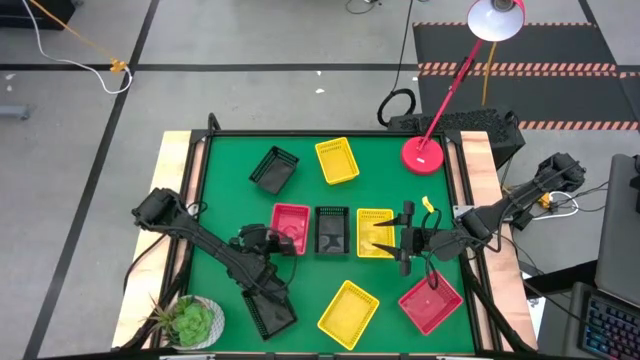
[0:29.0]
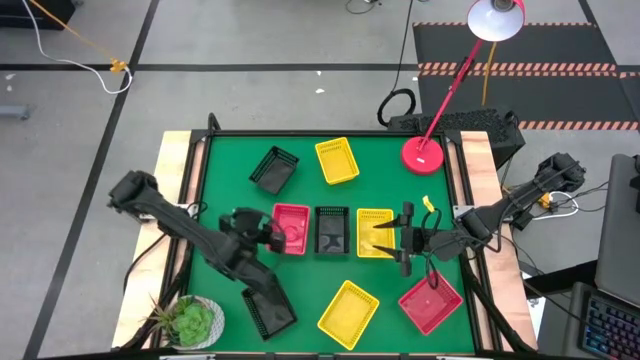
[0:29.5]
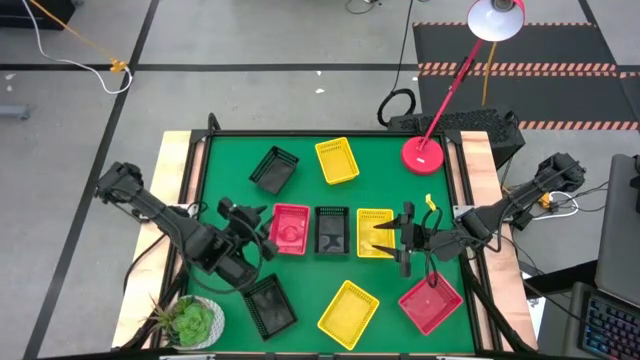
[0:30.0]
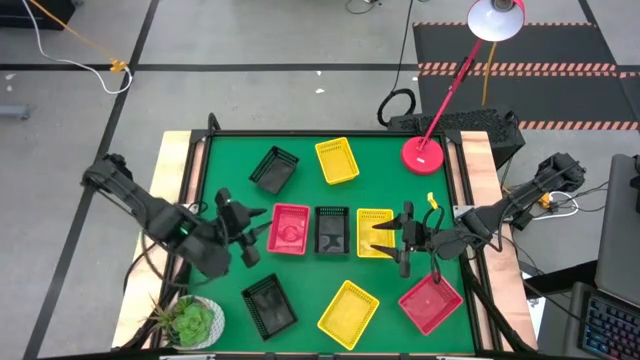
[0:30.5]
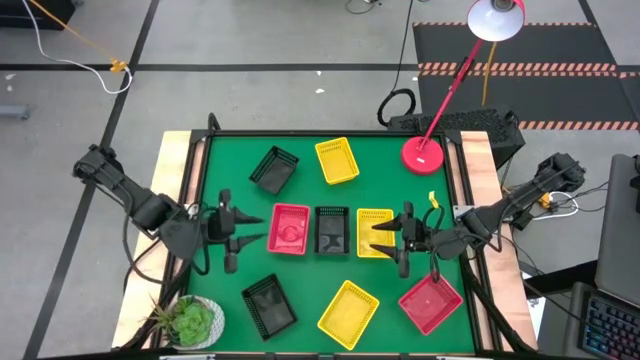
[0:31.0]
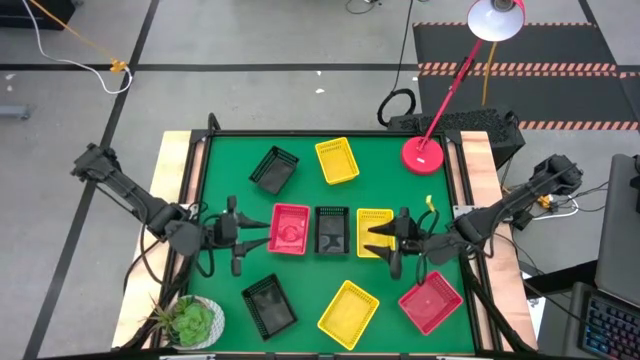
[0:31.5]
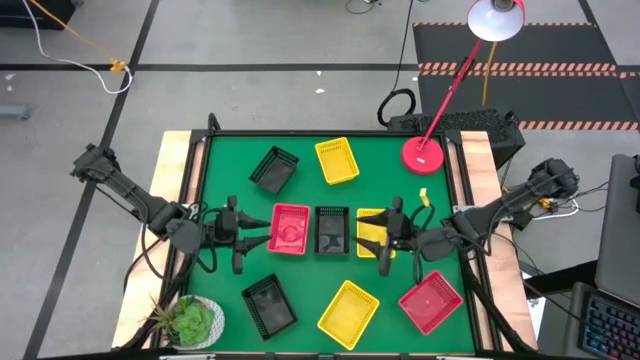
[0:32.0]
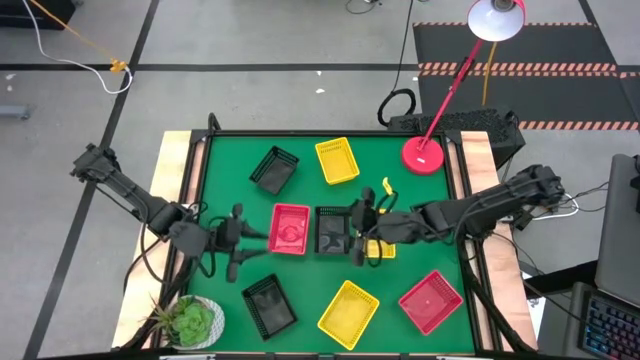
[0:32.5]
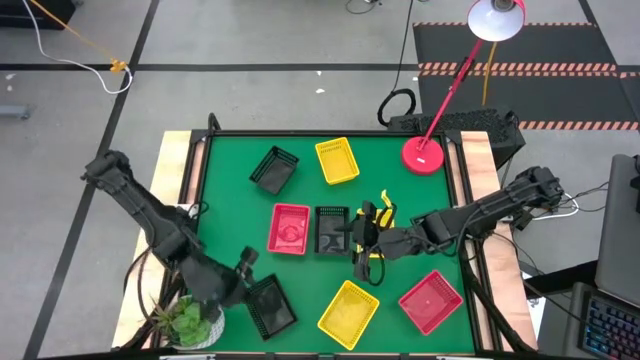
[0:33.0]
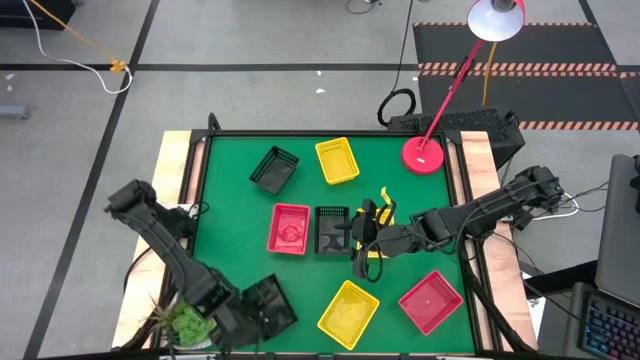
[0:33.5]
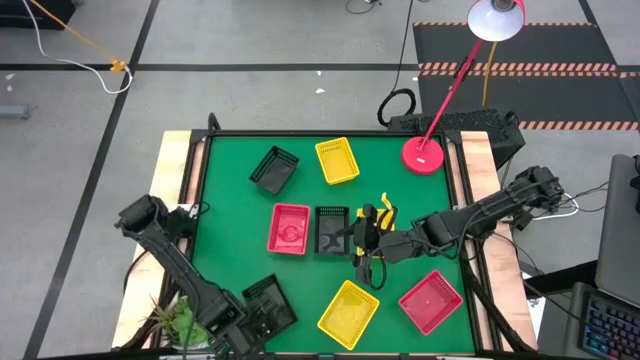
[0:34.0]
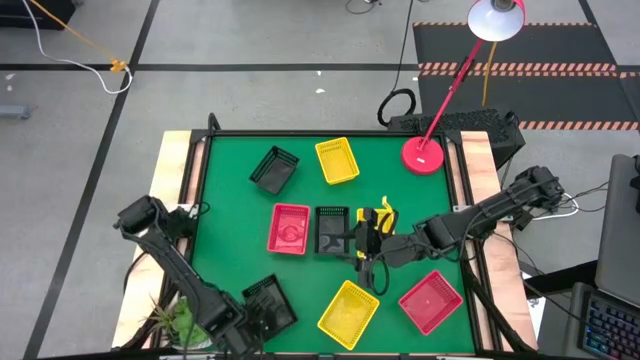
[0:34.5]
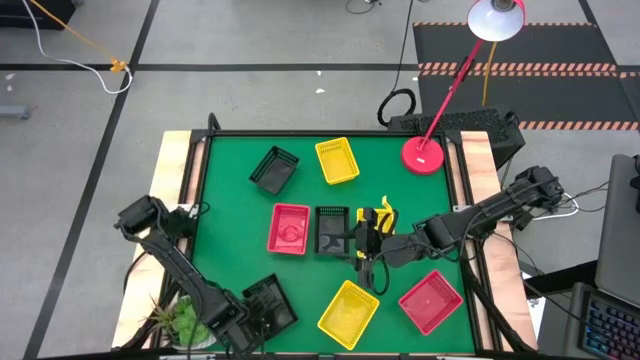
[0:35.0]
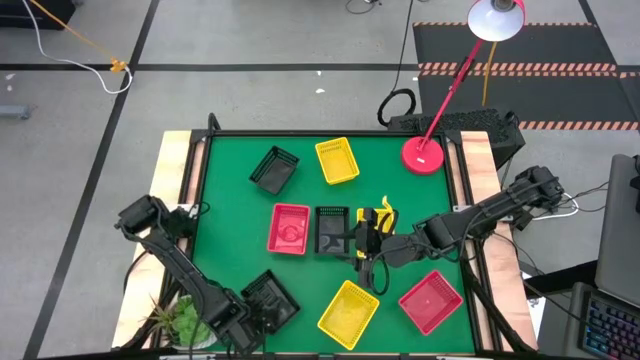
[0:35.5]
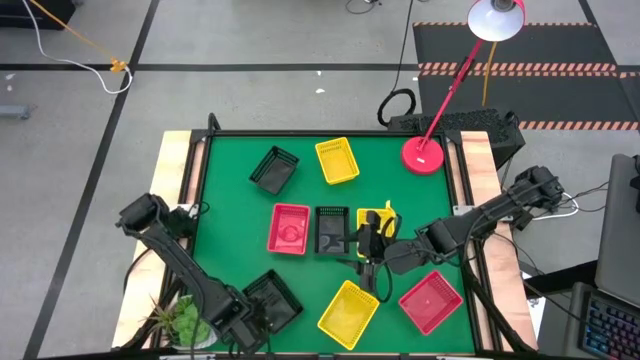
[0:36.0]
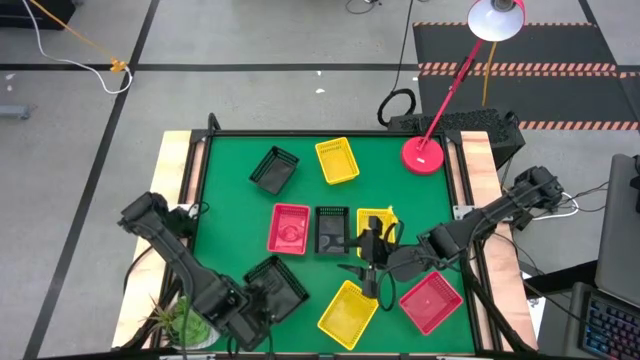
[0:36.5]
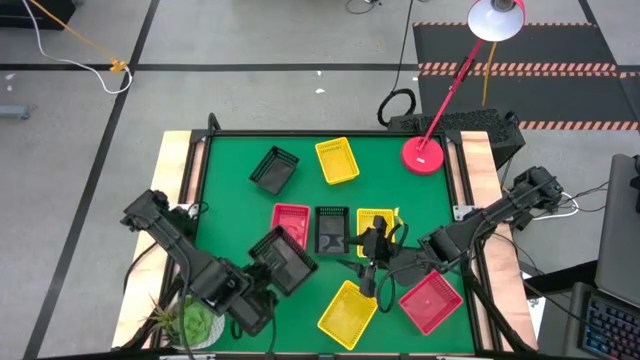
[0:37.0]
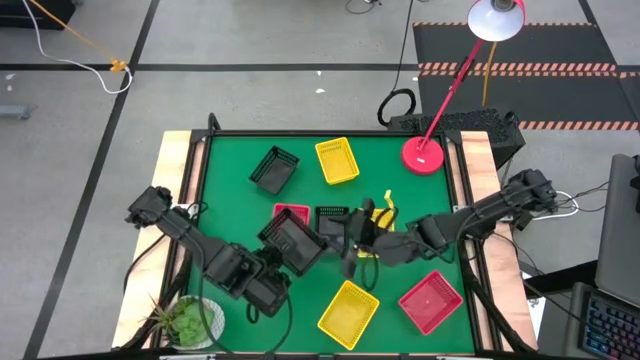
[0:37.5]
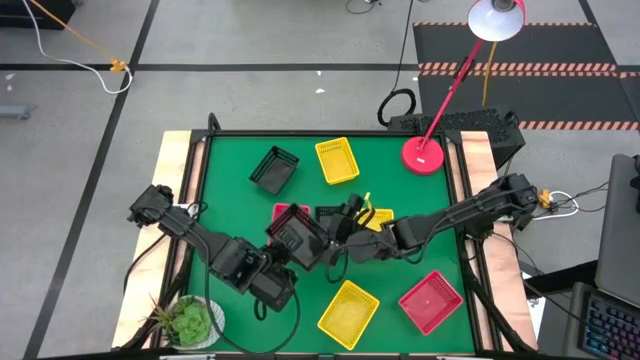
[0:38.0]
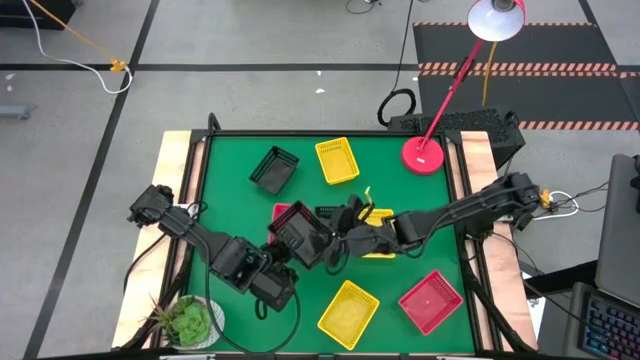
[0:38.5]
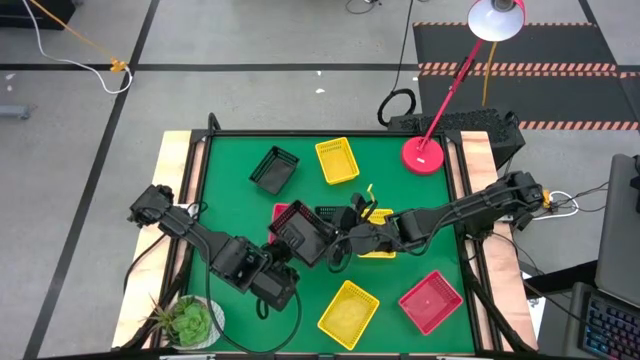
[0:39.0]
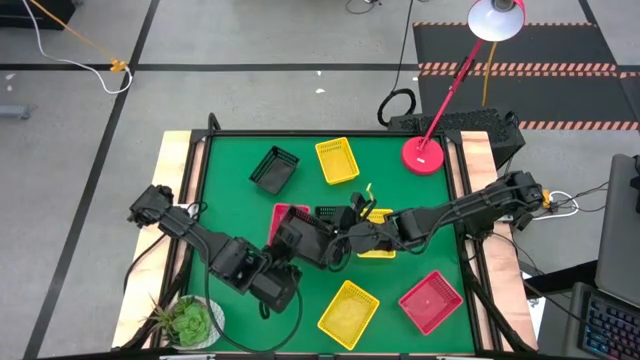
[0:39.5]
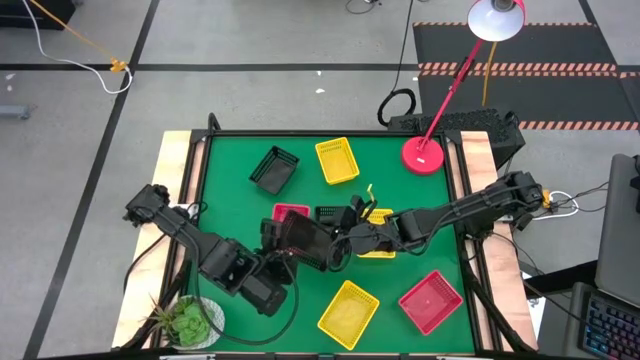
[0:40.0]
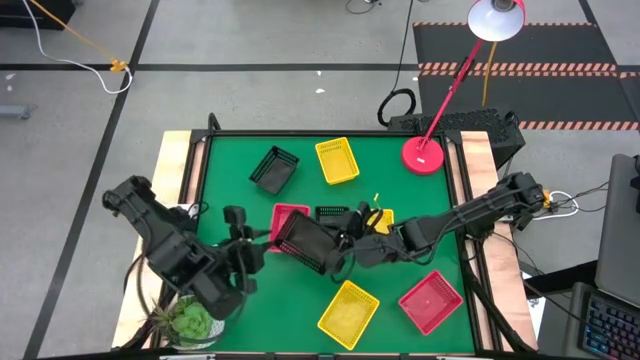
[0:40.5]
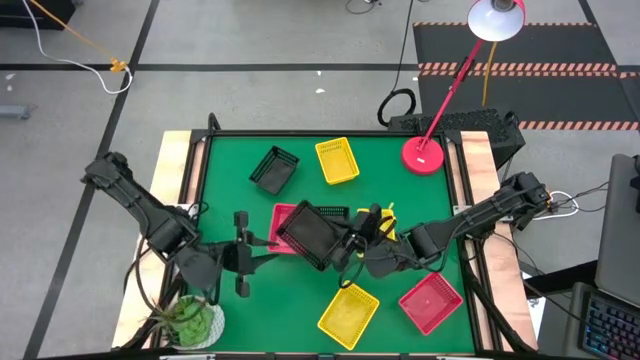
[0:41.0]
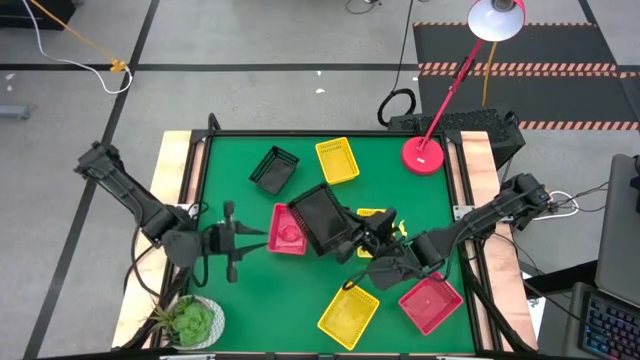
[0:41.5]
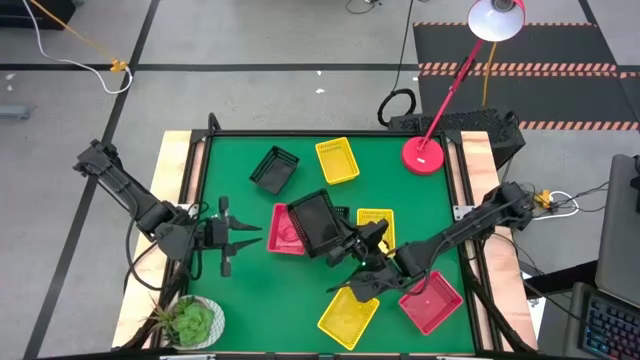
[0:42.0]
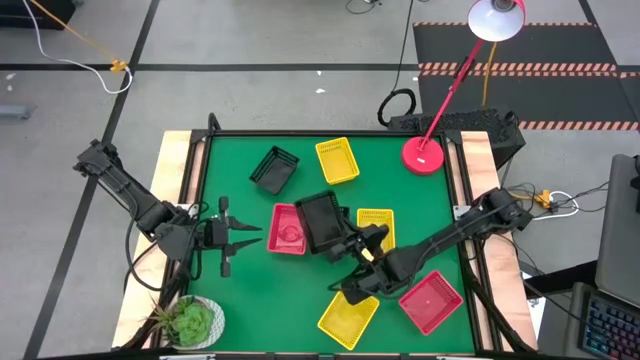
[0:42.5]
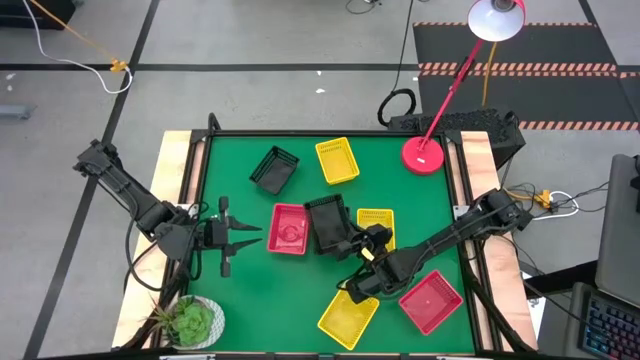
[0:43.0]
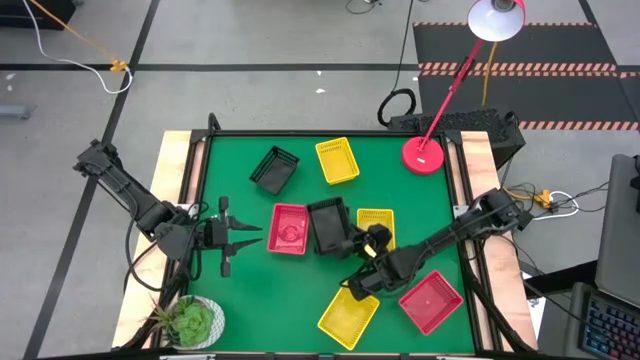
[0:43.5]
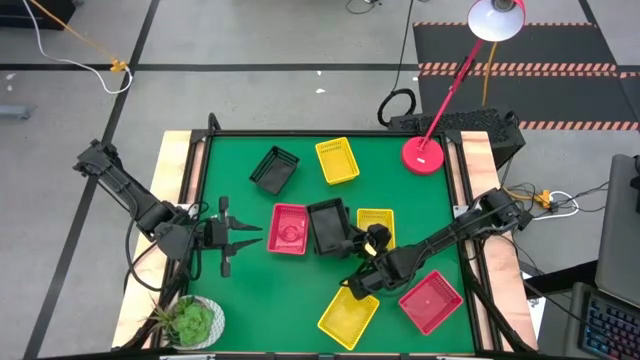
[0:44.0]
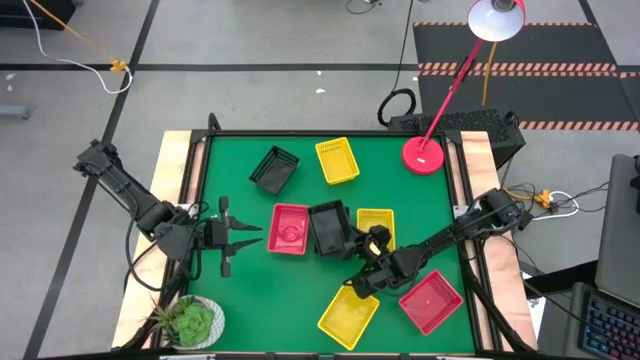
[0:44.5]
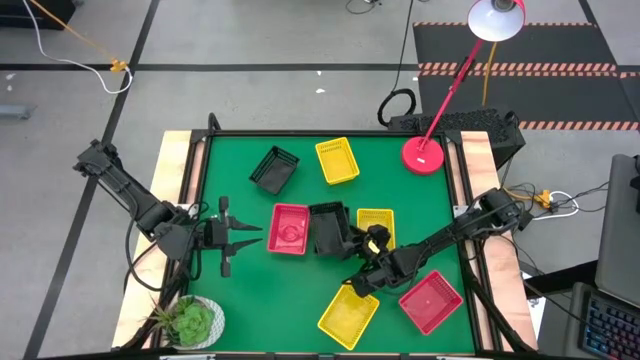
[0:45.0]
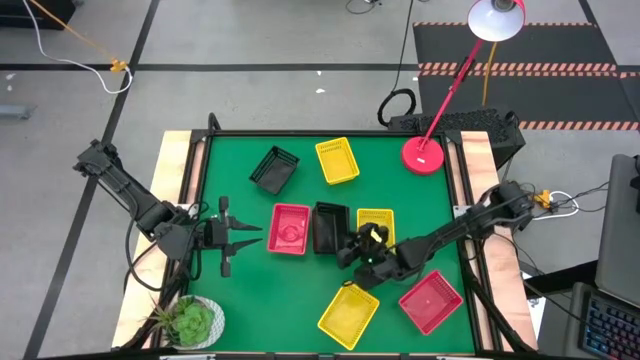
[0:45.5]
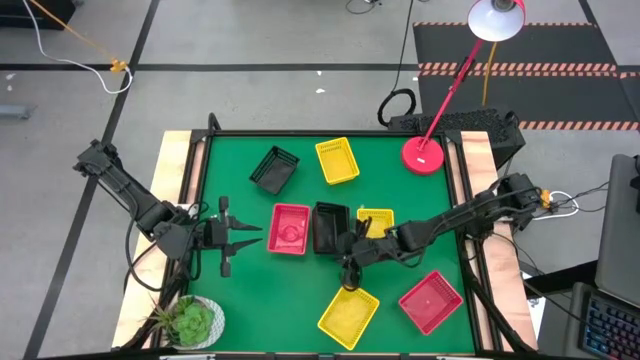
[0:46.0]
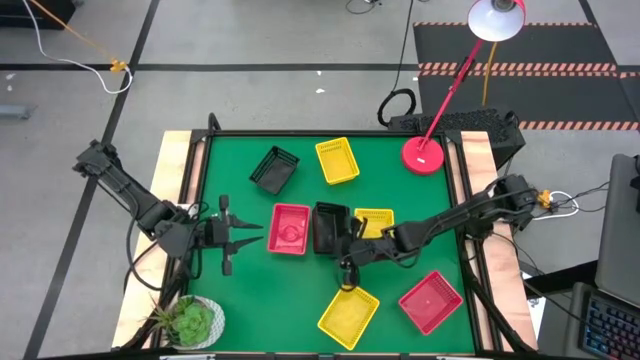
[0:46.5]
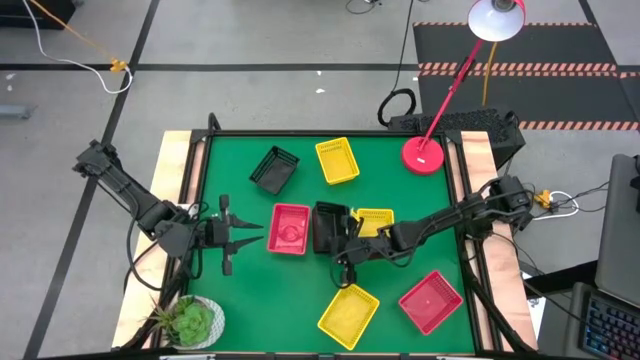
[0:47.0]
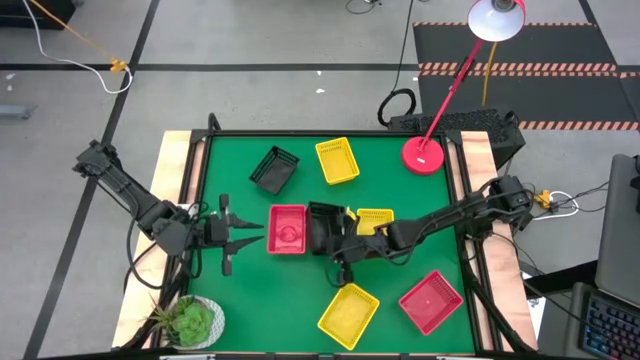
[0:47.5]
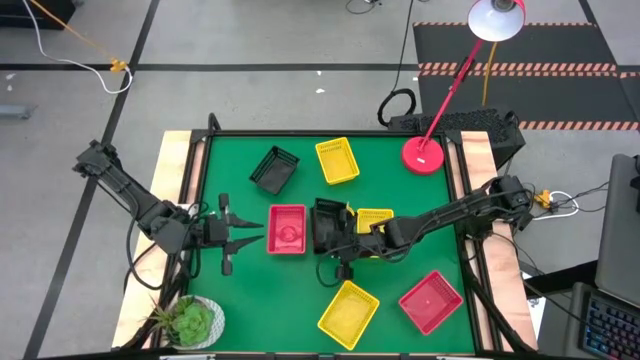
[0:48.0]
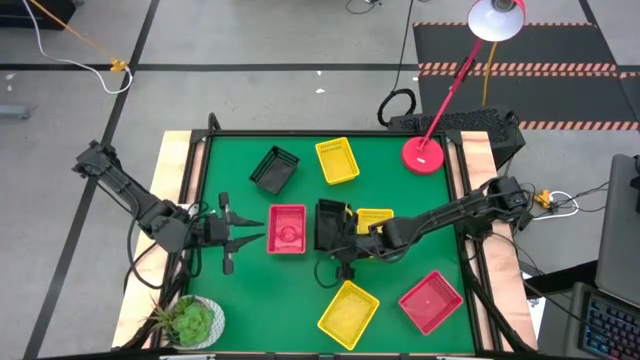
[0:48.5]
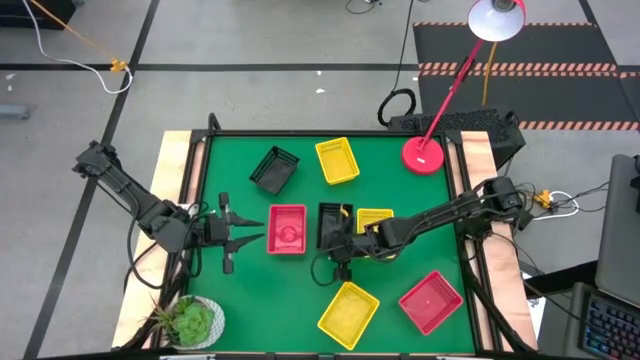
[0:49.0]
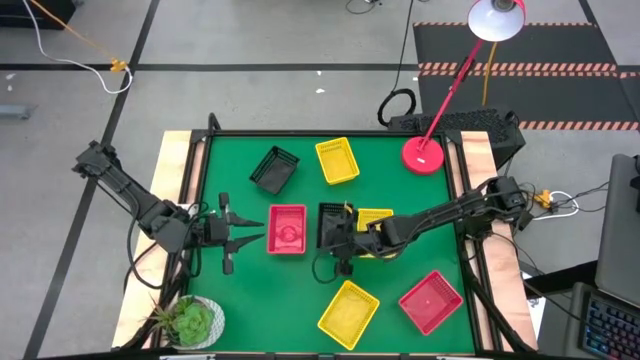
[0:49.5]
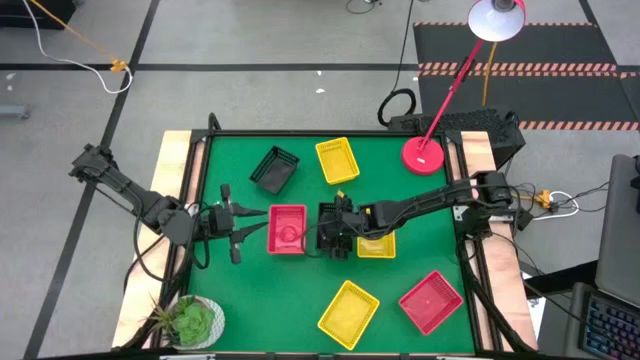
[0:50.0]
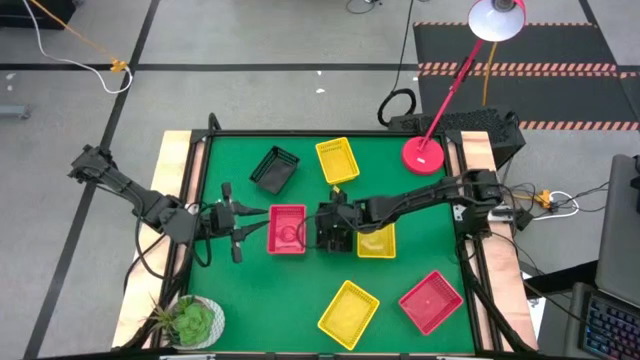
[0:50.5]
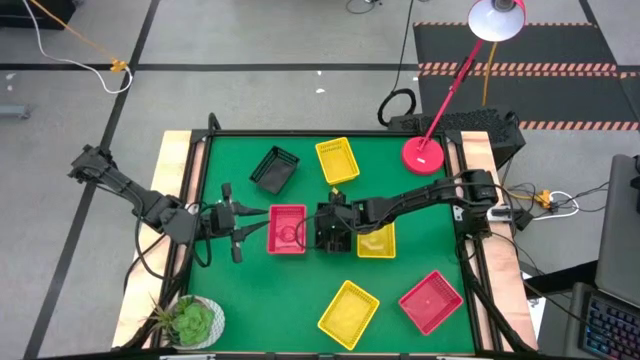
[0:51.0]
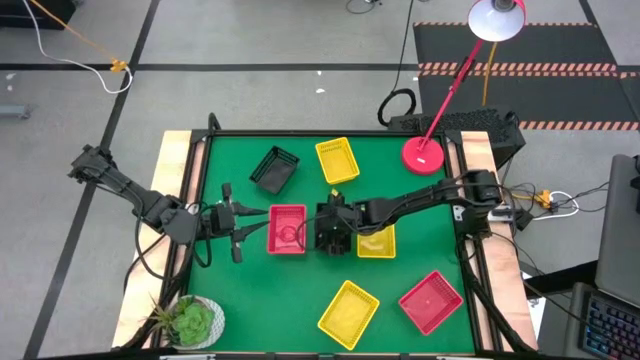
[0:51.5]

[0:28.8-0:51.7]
Stack the bottom black bin on top of the middle black bin
